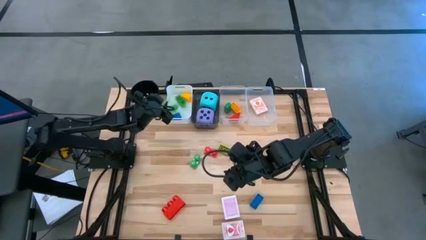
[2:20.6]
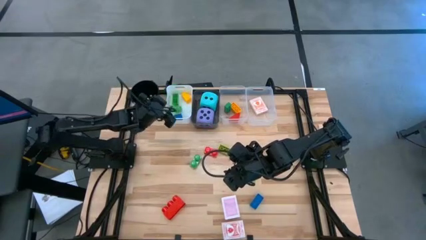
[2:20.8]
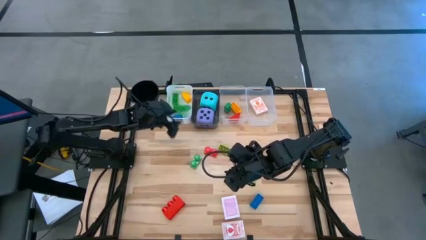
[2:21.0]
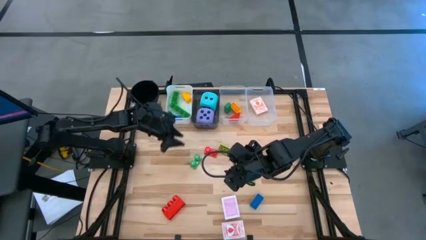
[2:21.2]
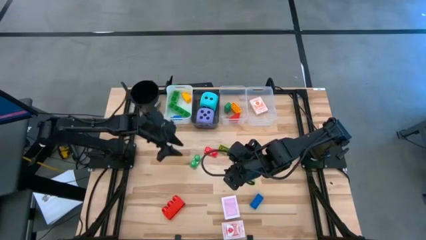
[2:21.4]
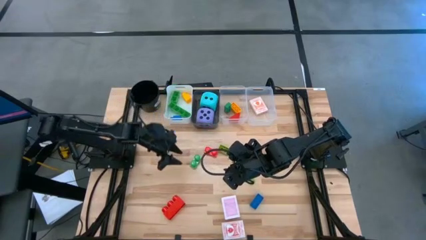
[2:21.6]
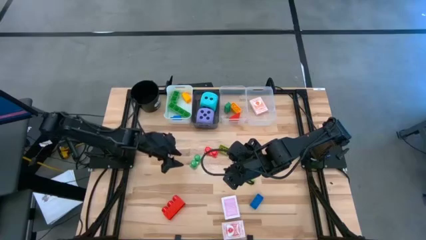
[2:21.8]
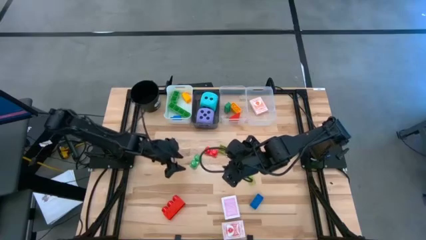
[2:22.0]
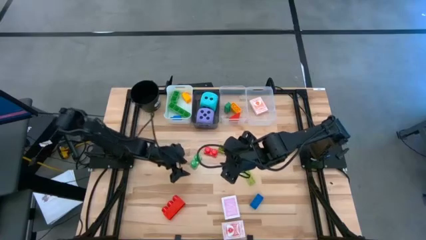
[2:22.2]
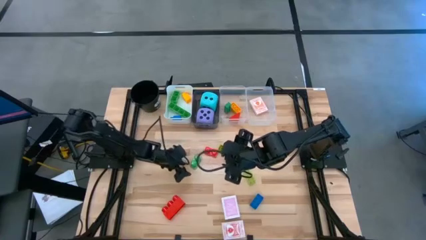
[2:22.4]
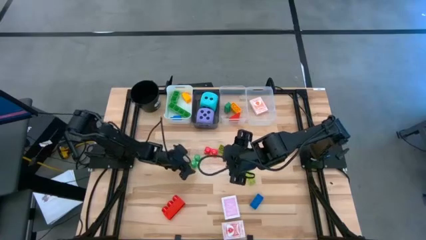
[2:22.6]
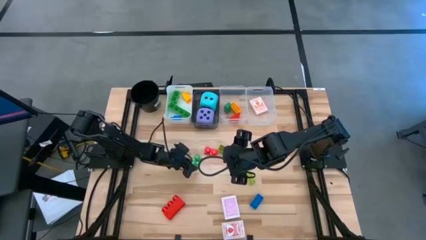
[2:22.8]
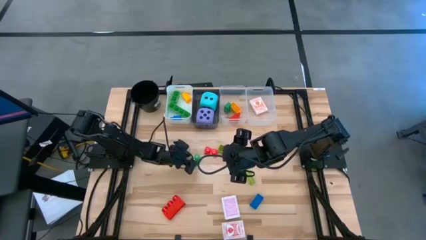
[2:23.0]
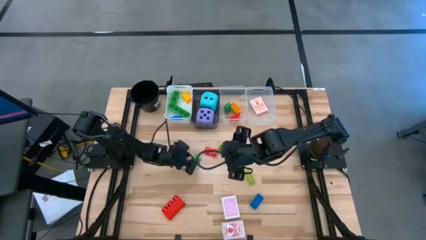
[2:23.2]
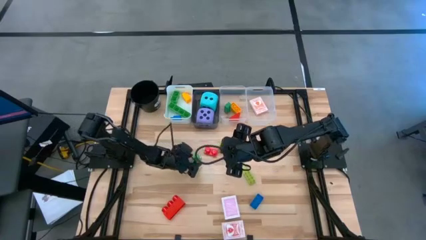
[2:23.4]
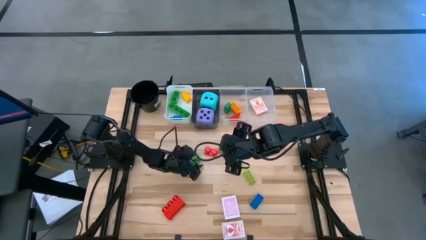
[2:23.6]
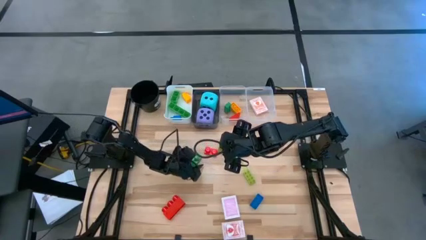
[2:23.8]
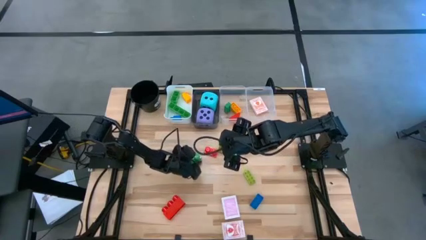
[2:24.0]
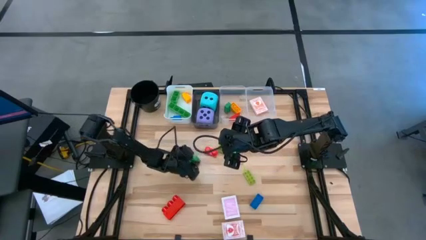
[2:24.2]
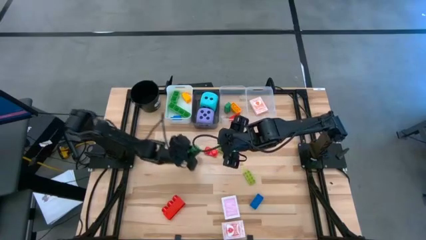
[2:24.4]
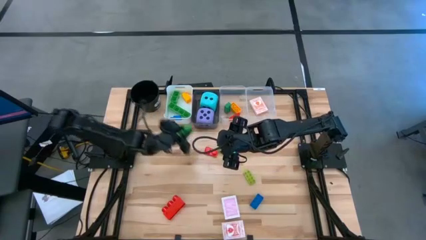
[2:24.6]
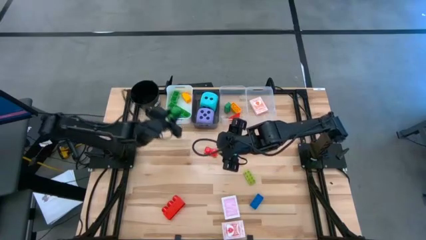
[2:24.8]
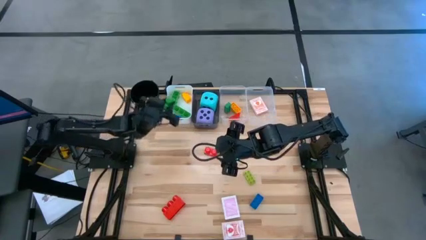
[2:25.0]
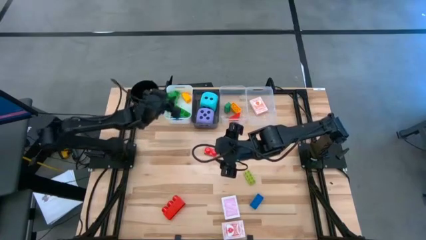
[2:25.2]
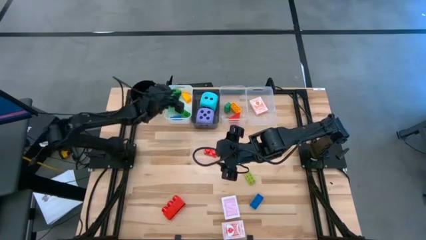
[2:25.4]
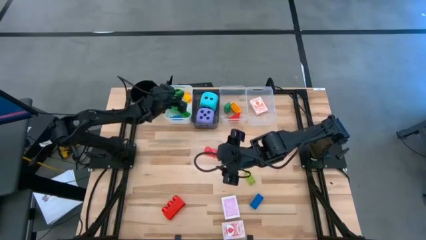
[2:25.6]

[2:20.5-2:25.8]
Task: Pick & Place Toys
Put the big green 2-stud game piece into the white bin

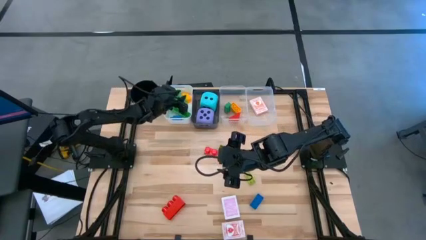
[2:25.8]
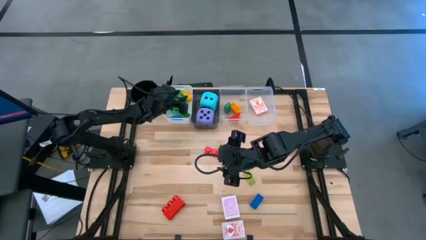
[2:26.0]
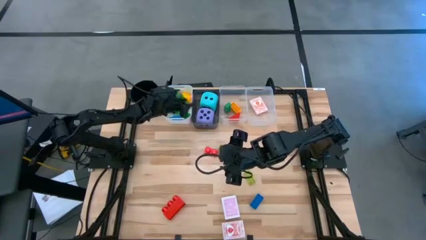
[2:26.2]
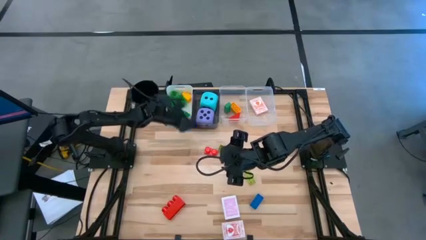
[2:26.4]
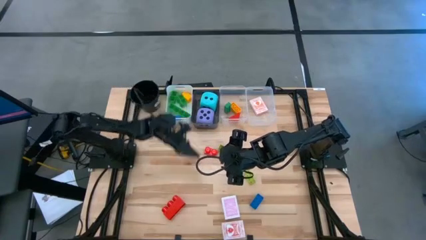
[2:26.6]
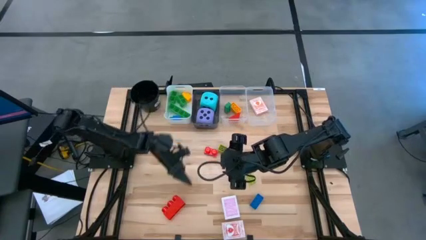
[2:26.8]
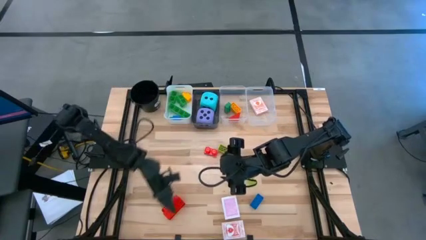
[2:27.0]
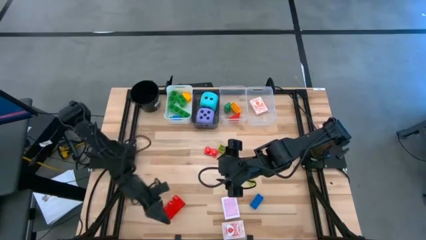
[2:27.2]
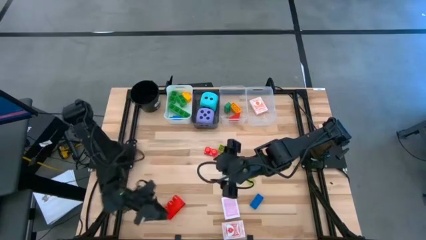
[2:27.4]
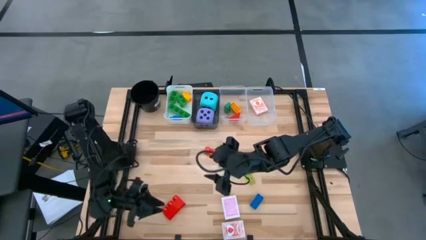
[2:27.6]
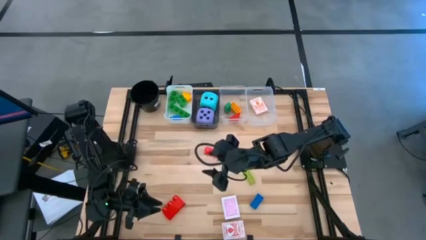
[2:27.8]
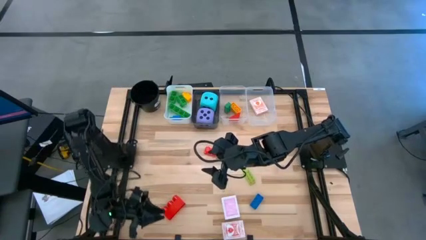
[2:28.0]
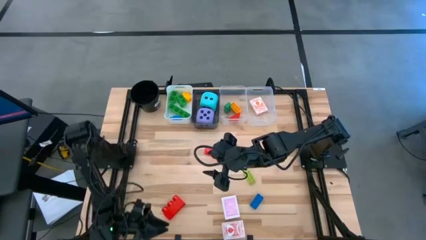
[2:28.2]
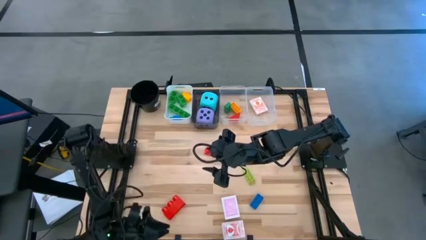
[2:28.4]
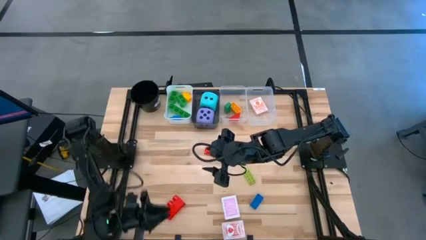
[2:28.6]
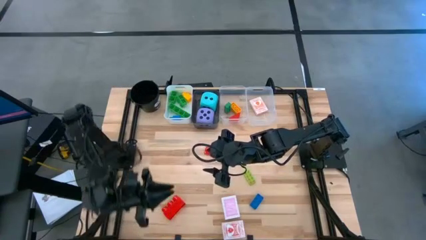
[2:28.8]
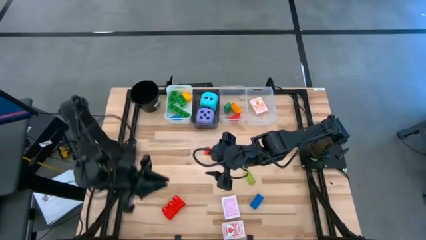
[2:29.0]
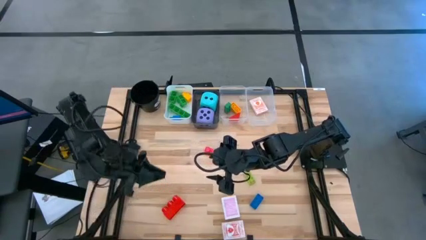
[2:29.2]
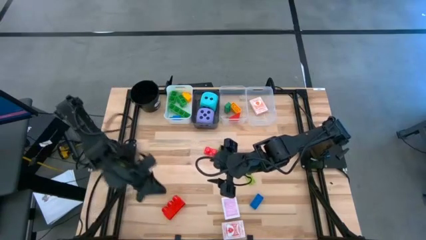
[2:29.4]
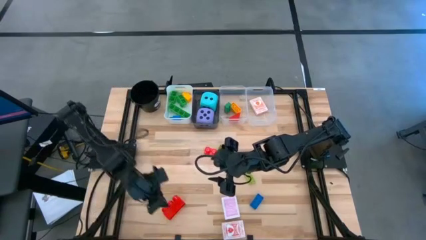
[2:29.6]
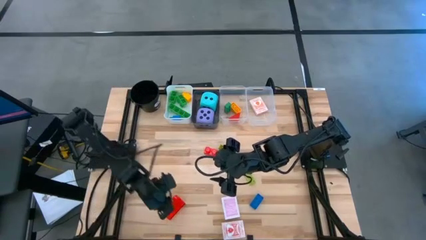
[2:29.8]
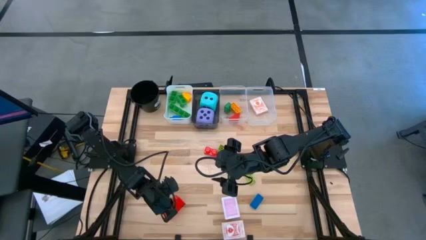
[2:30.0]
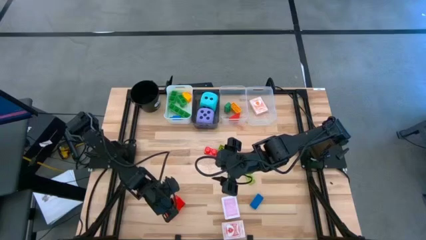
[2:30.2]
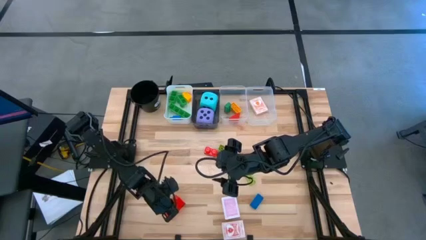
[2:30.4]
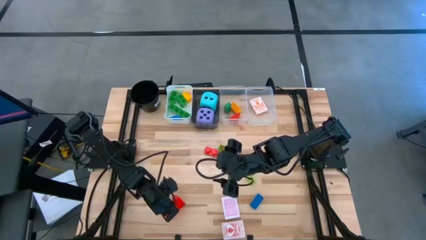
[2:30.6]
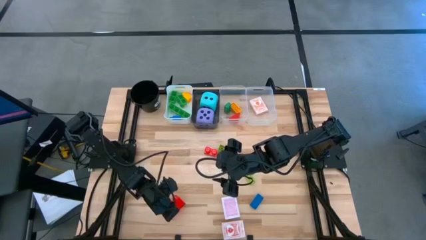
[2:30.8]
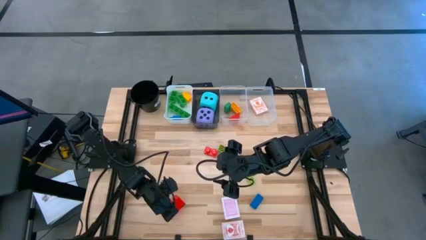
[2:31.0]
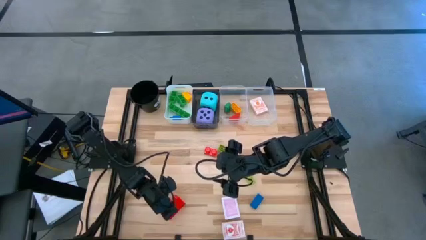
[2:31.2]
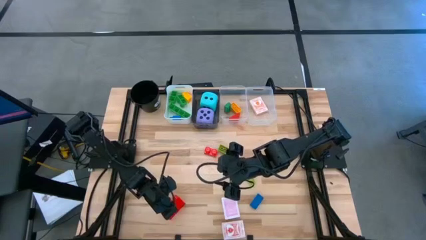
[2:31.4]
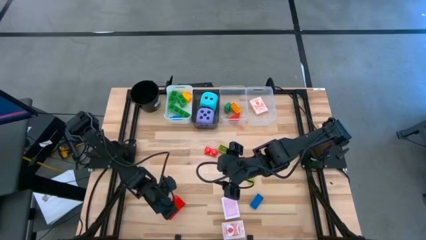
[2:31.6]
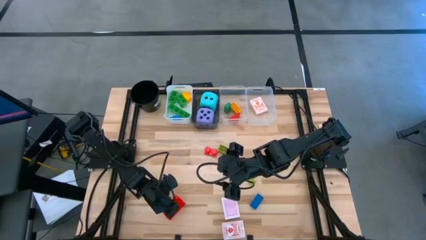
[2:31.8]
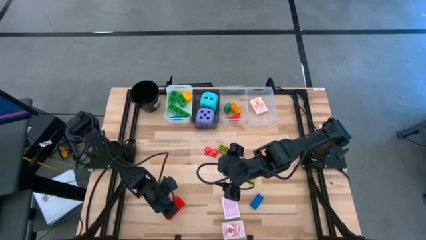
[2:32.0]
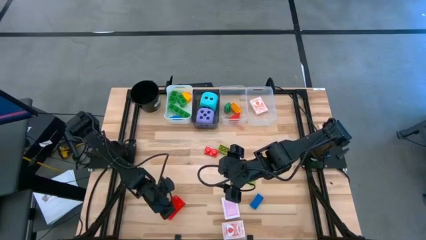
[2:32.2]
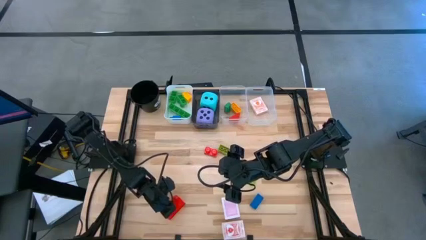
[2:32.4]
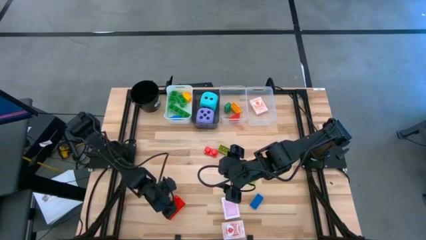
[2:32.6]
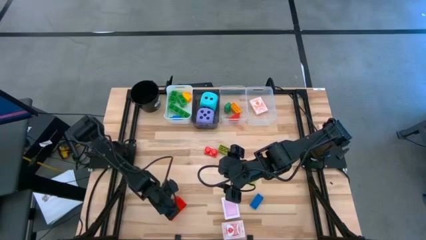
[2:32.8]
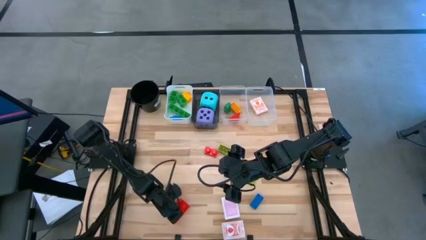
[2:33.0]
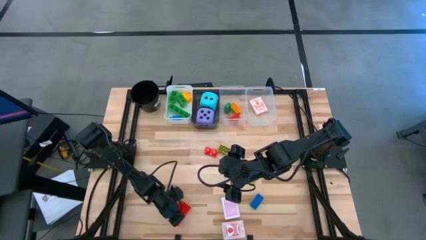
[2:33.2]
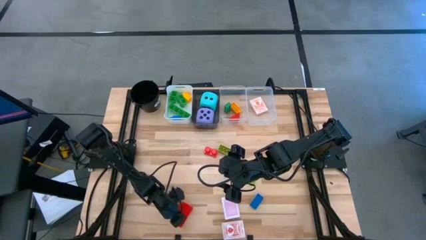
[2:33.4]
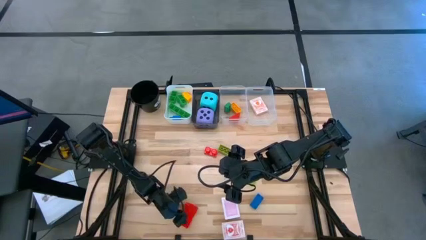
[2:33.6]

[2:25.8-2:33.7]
Put the big red 3-stud game piece into the white bin

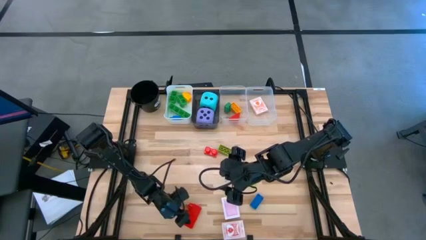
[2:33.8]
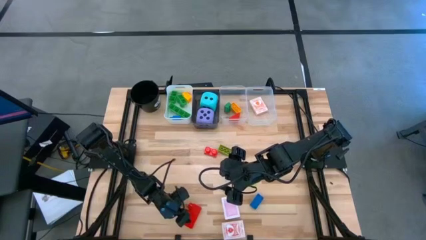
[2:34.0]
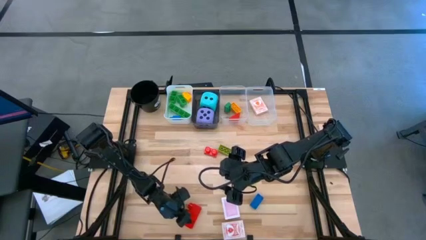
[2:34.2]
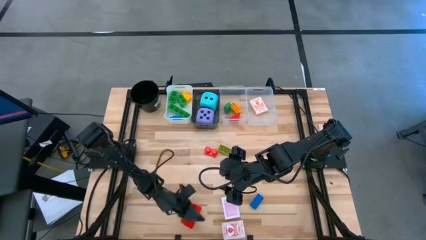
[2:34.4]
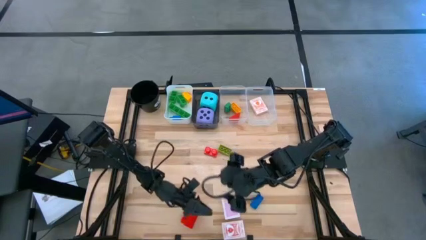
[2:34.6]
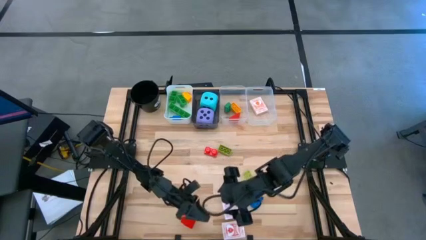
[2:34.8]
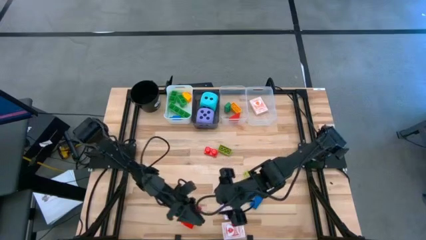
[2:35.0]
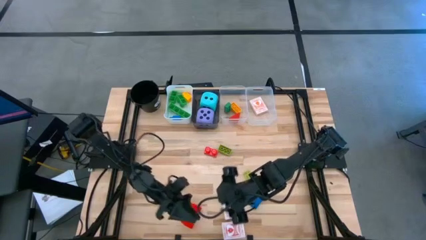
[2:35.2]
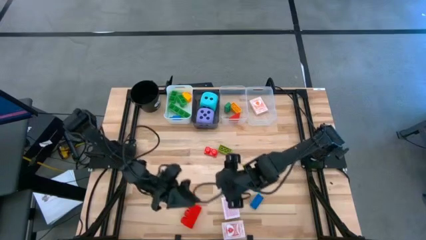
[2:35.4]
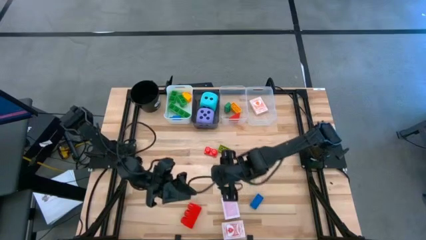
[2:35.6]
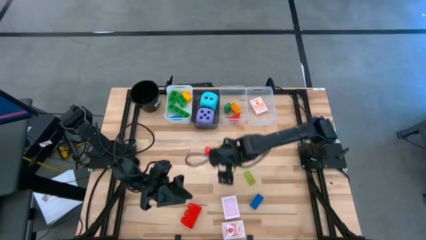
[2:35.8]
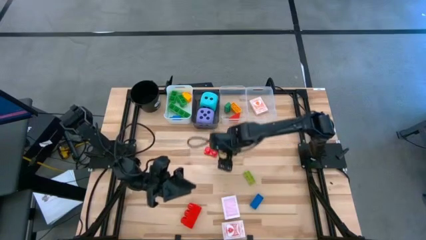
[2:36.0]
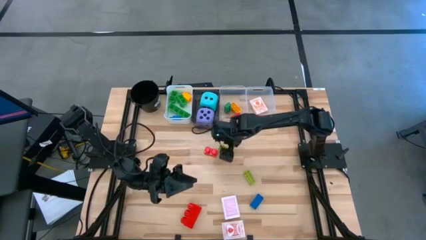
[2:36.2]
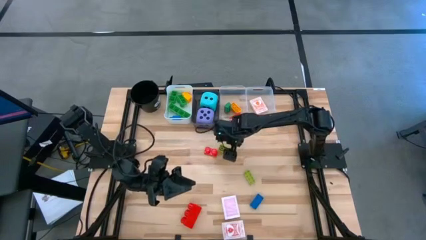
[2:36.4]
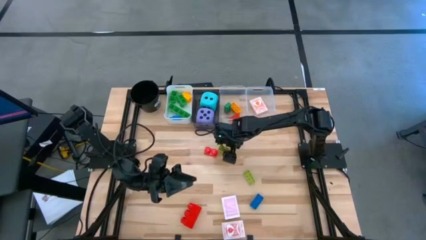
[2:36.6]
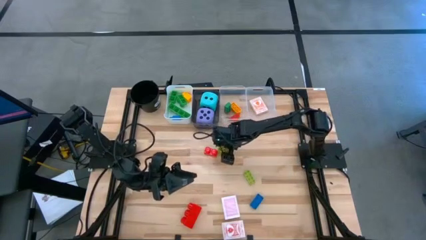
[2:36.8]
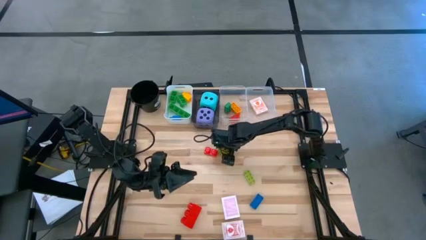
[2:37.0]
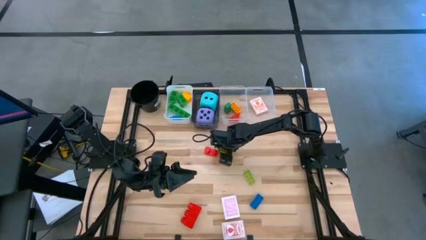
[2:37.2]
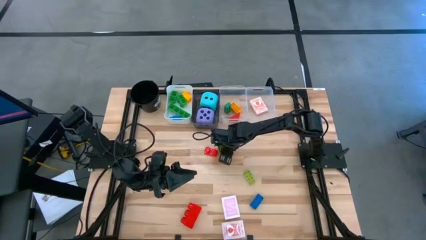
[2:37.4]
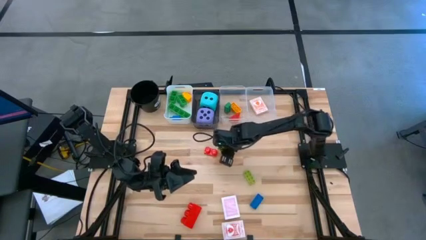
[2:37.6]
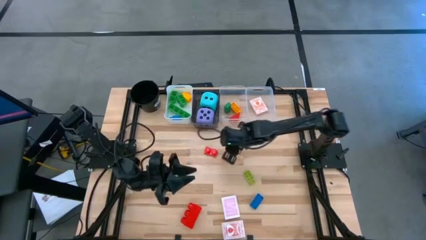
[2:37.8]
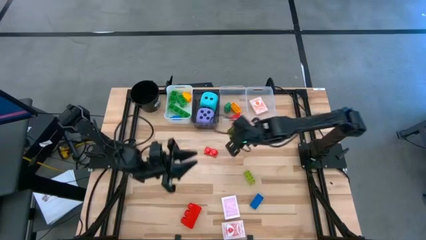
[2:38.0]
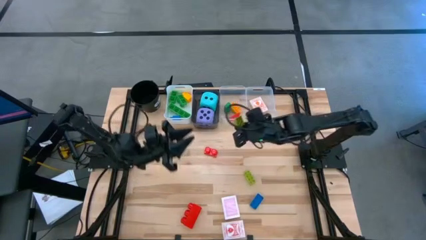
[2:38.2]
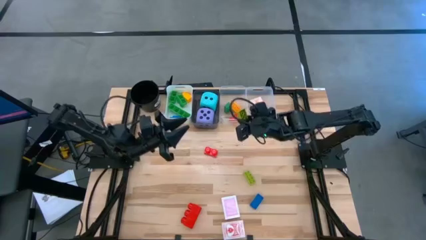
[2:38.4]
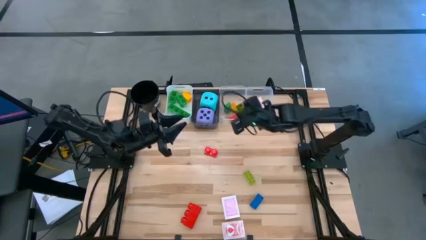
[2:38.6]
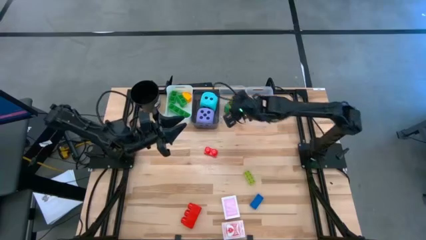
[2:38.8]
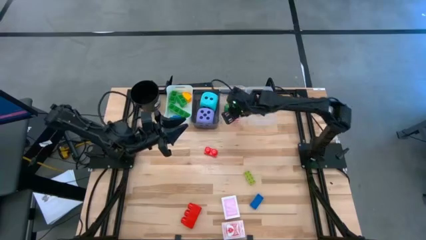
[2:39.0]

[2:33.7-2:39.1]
Put the small light green 8-stud game piece into the right transparent bin
